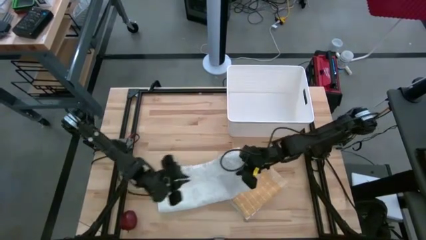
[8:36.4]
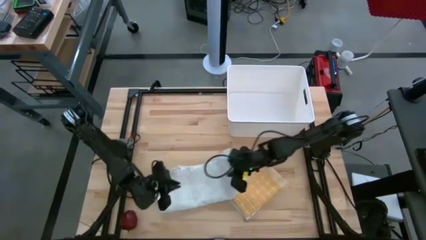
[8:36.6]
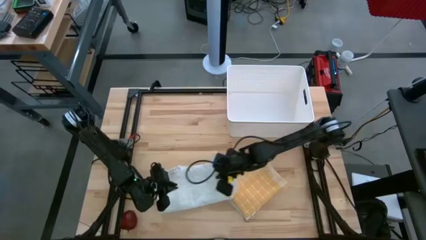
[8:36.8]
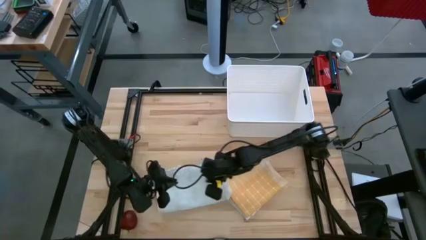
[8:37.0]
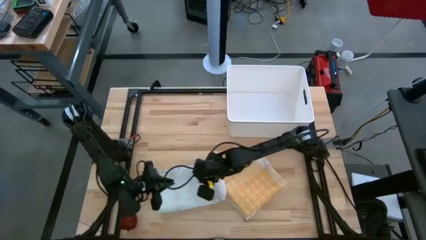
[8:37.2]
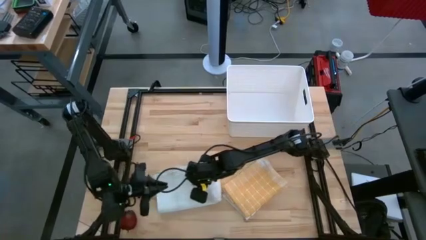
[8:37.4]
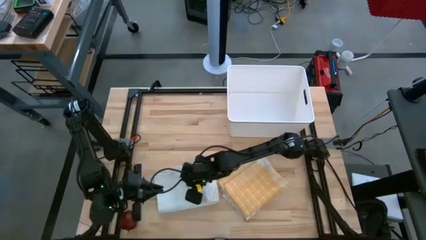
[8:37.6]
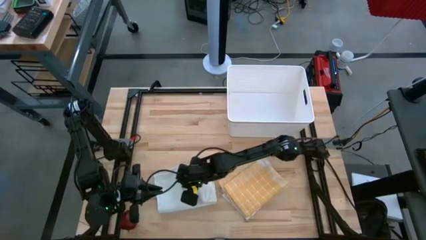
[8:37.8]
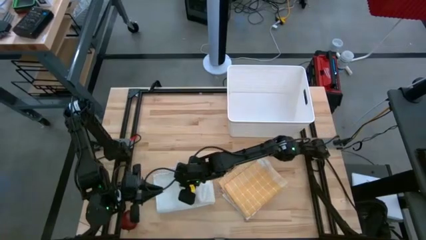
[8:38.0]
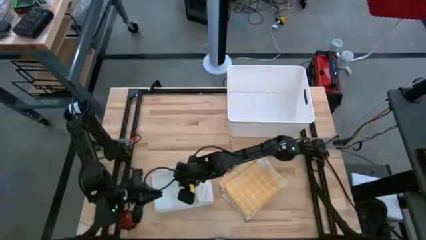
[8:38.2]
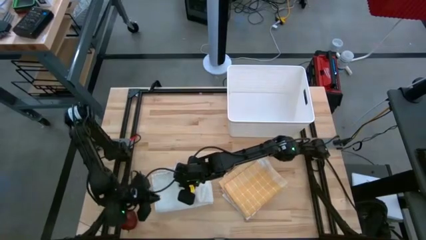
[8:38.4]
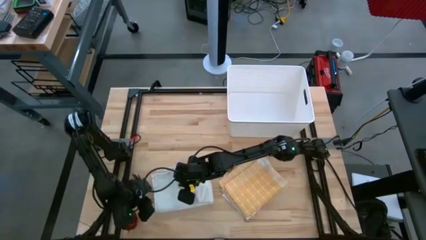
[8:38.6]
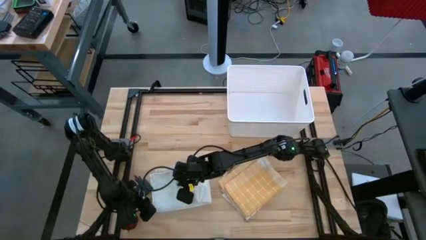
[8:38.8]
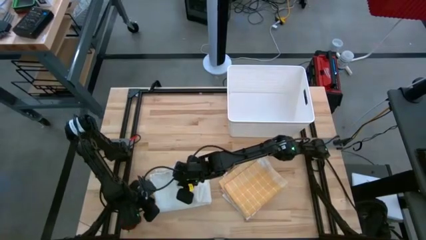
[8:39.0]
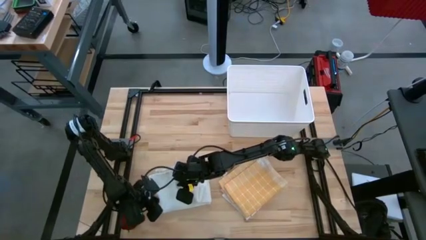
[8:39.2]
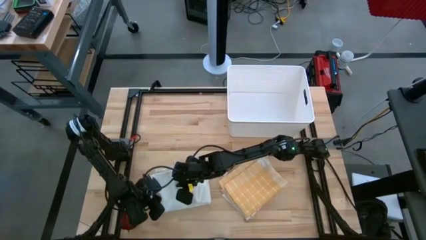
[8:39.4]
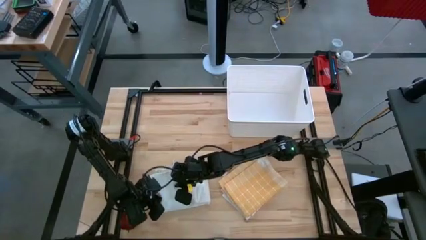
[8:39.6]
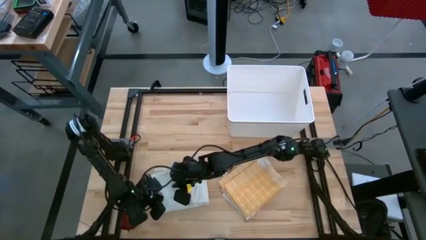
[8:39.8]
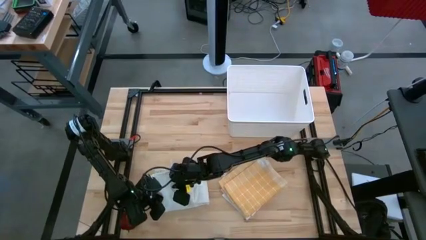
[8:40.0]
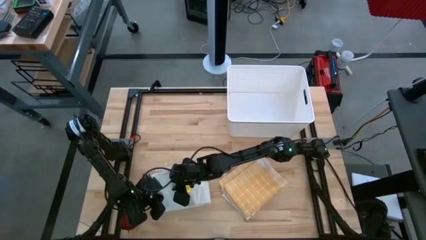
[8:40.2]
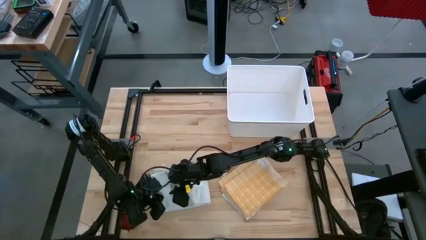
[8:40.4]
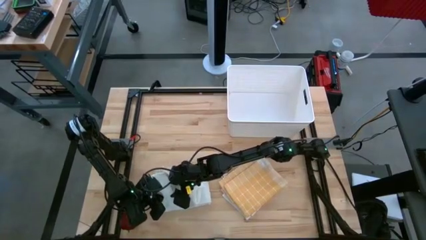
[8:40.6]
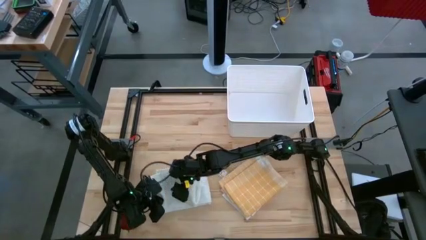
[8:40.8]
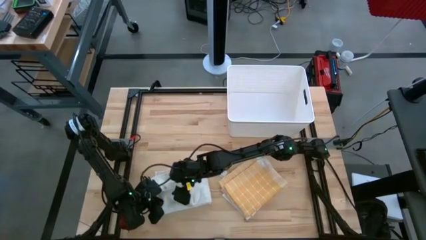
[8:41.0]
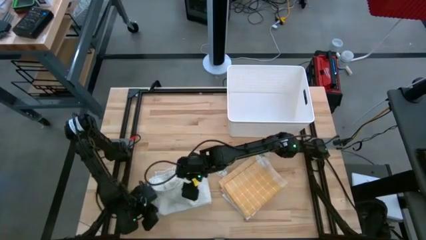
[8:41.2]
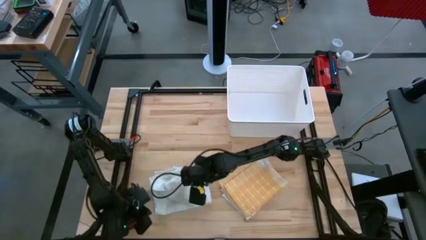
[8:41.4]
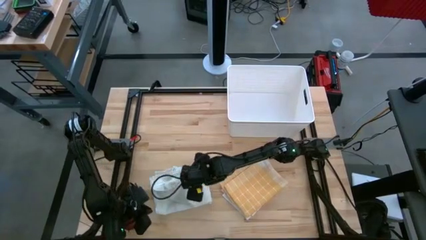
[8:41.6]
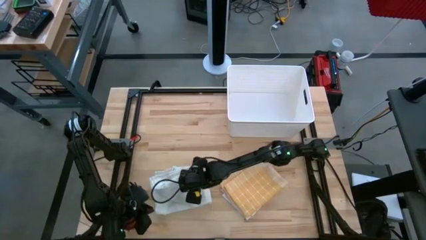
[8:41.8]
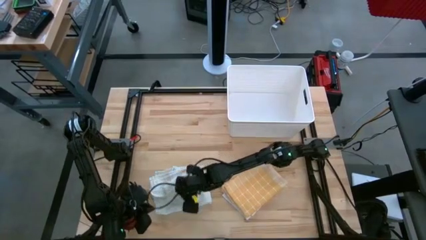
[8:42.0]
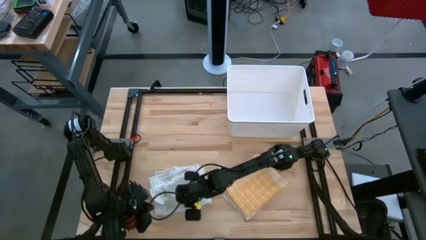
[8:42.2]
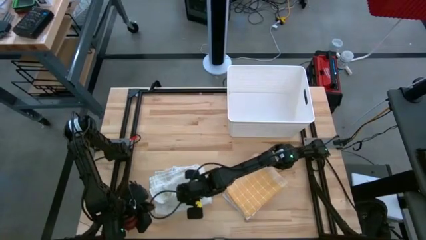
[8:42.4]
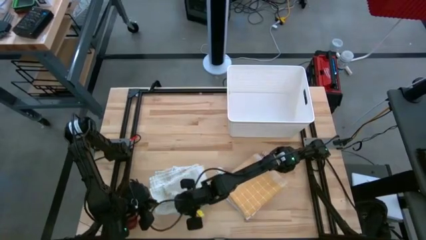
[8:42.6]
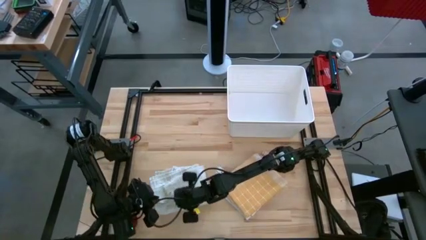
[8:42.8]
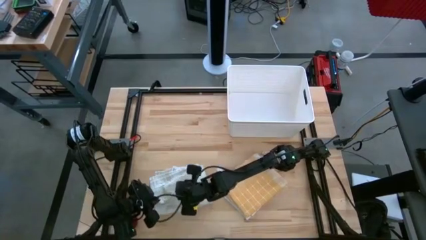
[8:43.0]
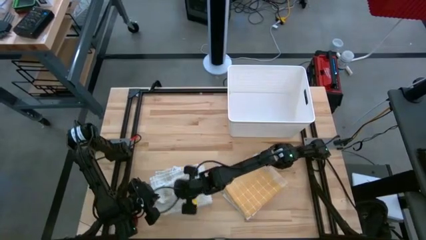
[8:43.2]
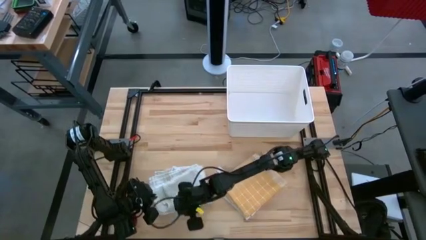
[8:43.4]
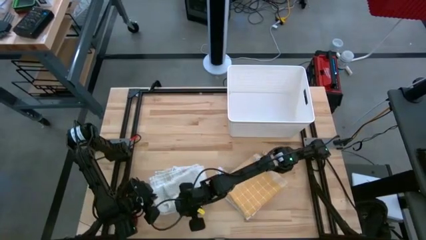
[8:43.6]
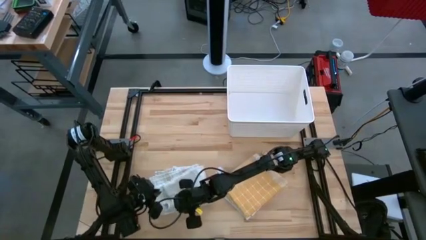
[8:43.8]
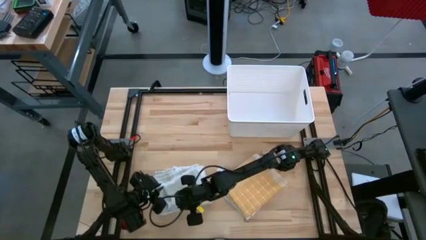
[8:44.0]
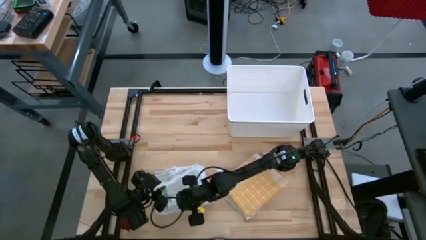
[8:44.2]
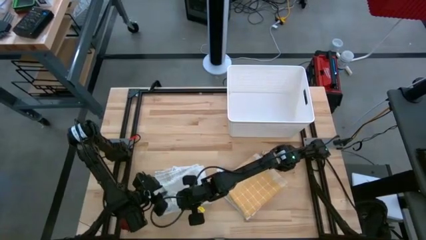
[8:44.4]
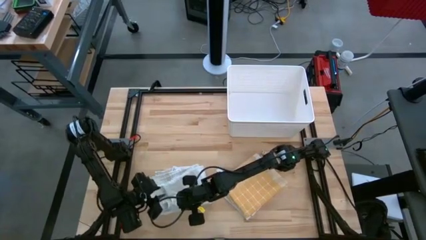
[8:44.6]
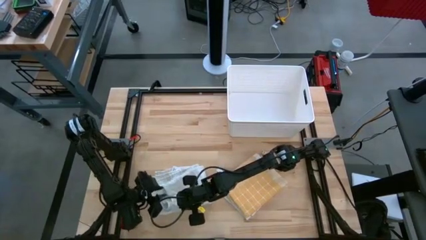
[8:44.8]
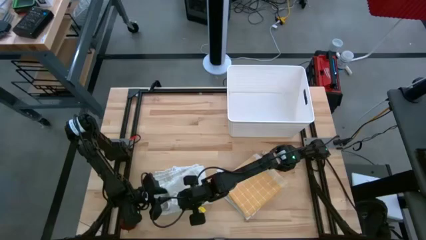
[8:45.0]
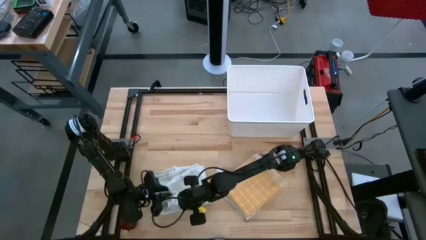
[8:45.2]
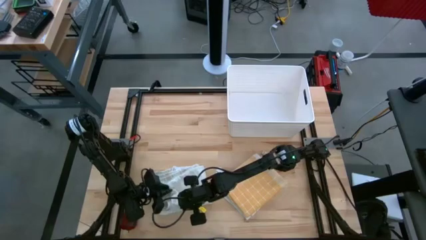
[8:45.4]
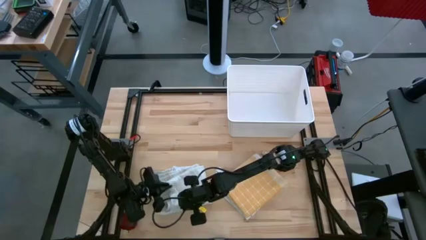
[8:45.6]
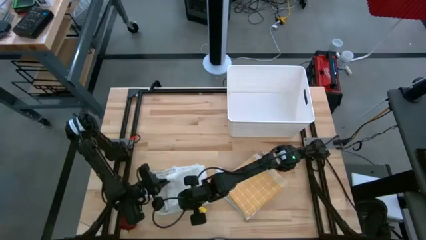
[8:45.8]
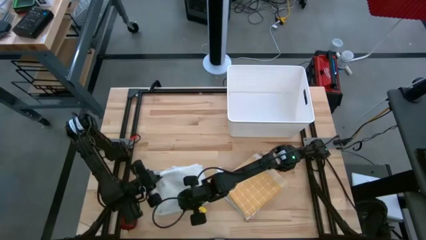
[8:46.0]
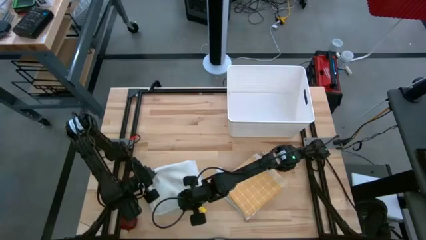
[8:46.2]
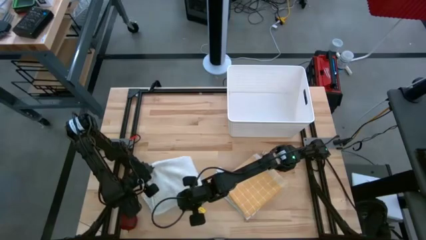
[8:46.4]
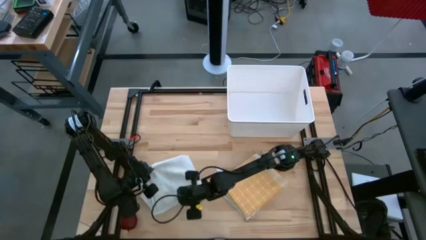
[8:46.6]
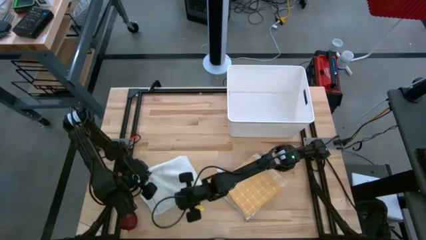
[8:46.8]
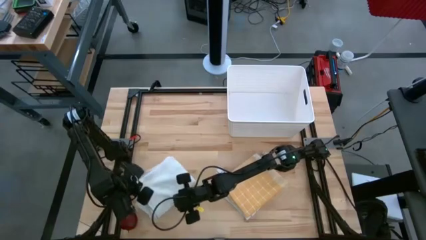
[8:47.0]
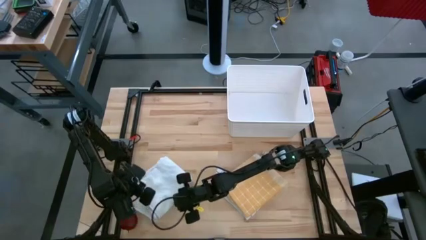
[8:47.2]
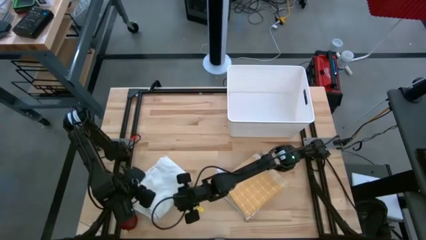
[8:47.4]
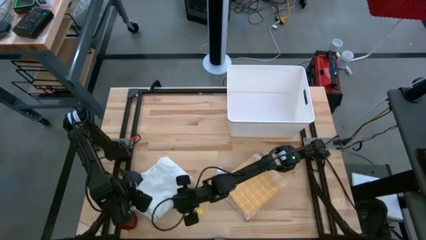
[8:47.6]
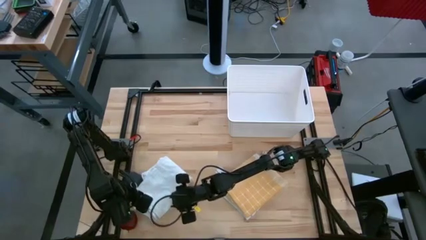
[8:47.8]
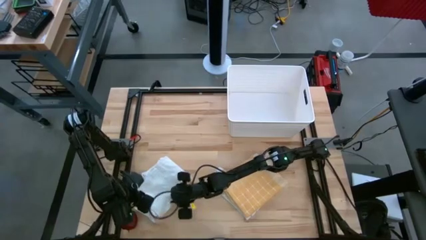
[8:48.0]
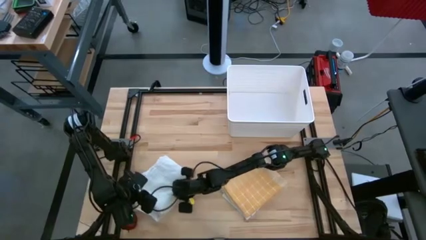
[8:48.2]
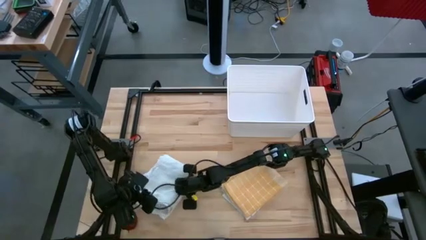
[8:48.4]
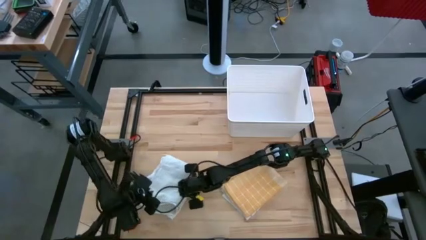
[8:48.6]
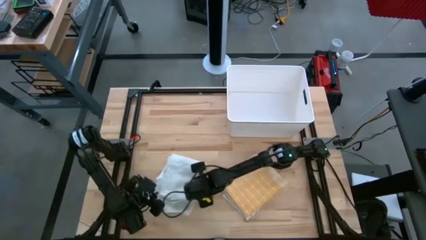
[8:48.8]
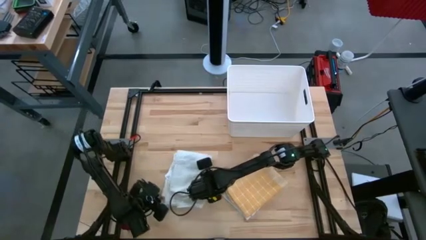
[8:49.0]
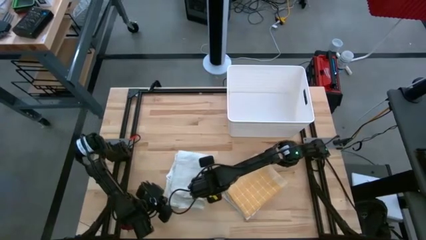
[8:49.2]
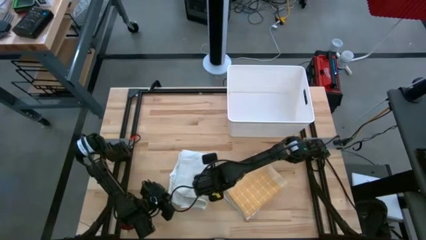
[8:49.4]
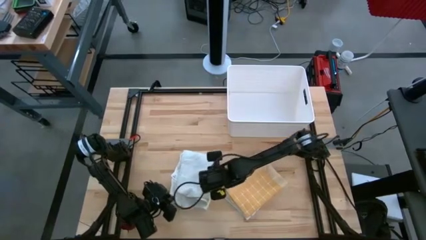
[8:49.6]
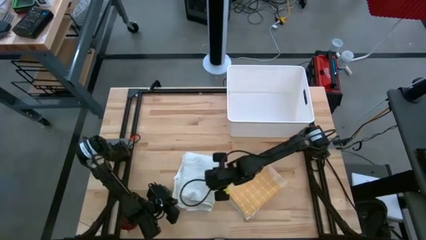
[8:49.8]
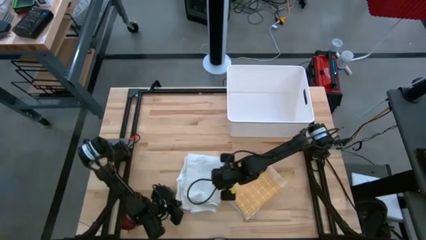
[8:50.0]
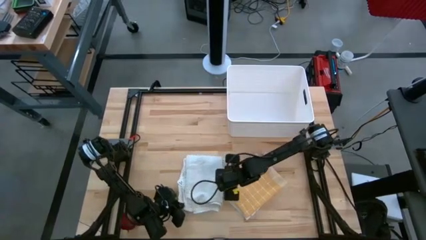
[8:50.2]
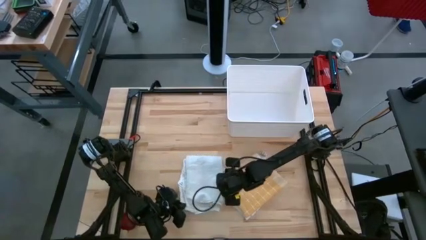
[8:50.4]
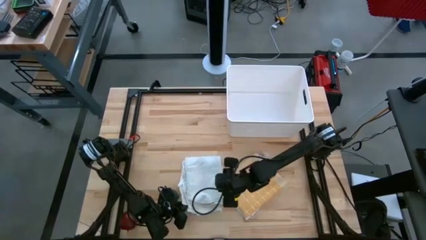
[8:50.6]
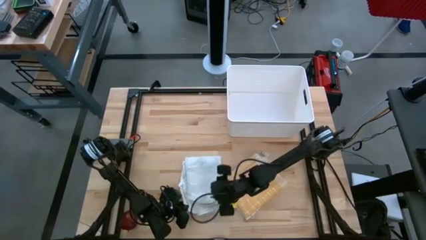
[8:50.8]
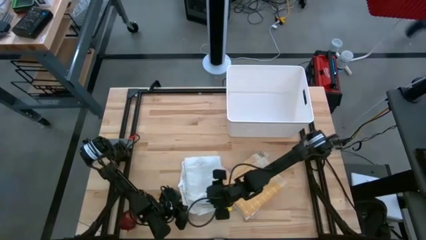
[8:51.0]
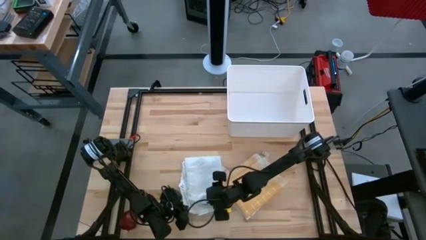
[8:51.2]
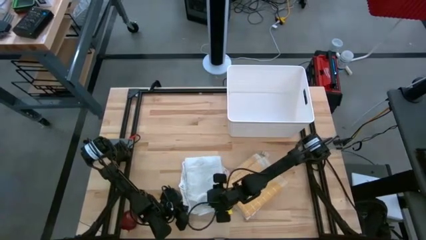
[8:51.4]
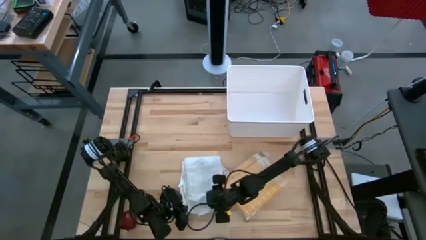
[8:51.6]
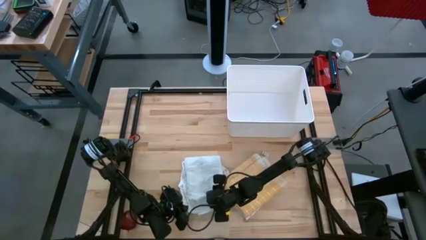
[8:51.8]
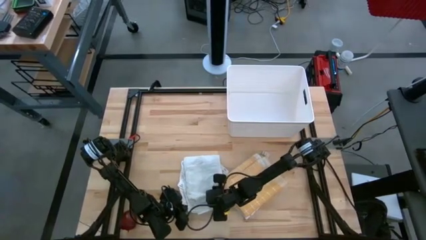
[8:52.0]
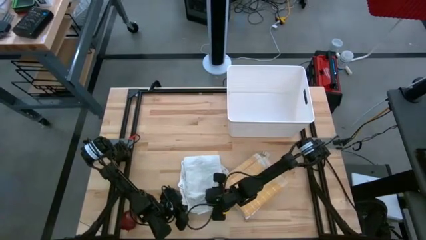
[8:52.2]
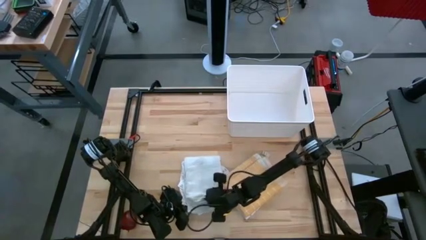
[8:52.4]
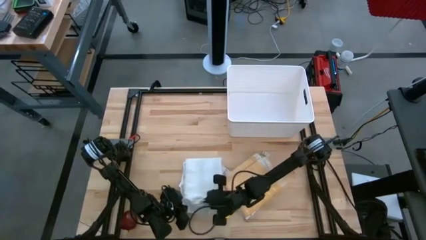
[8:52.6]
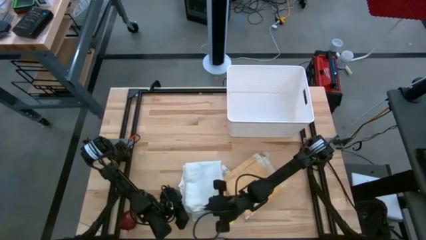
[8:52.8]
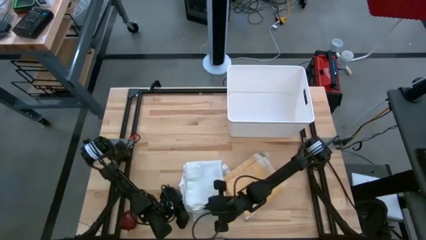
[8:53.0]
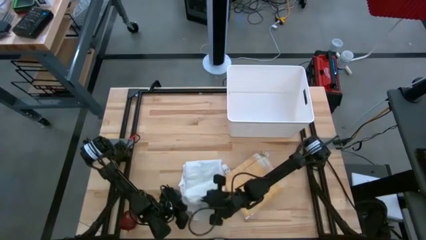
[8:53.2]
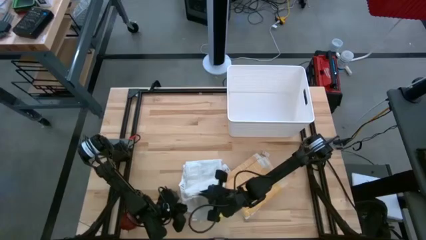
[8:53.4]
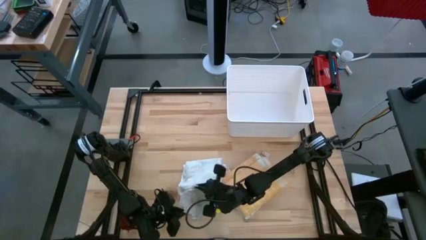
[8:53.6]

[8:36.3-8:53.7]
Task: Fold towel
Fold the white checkered towel
